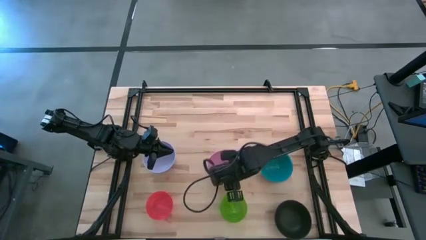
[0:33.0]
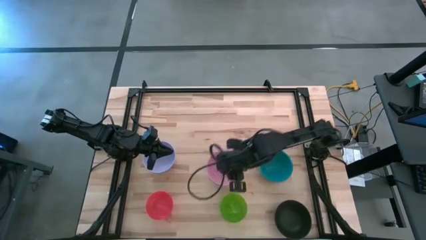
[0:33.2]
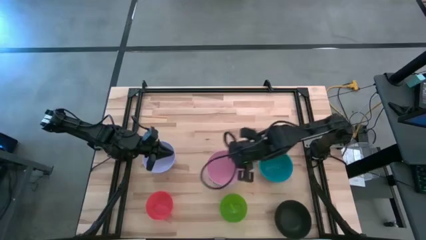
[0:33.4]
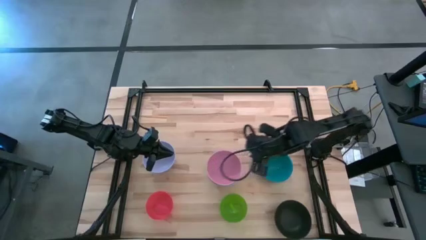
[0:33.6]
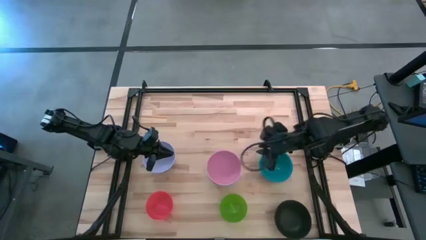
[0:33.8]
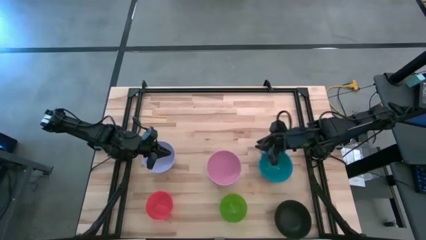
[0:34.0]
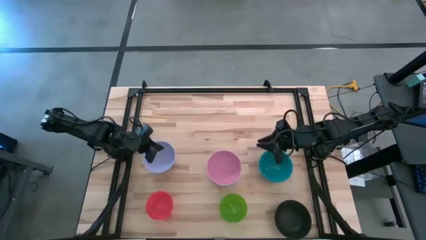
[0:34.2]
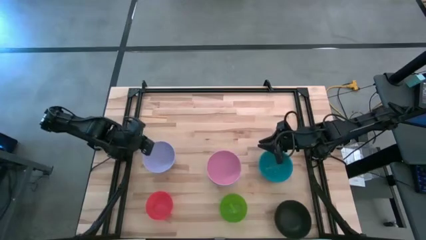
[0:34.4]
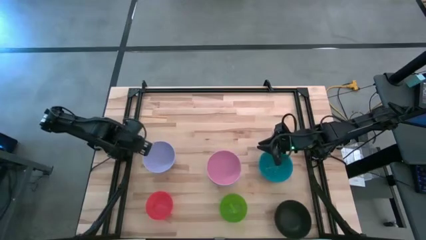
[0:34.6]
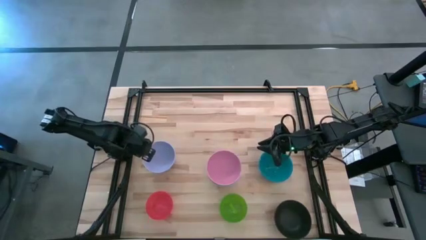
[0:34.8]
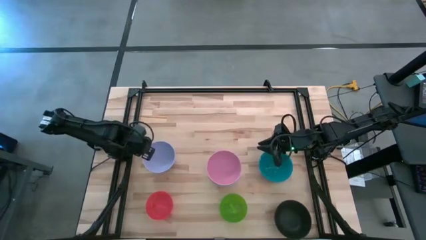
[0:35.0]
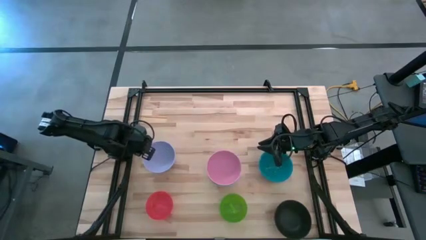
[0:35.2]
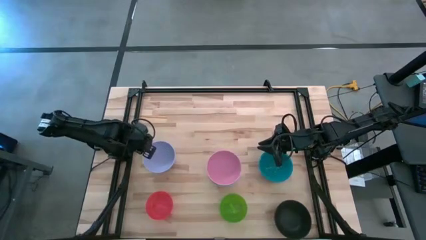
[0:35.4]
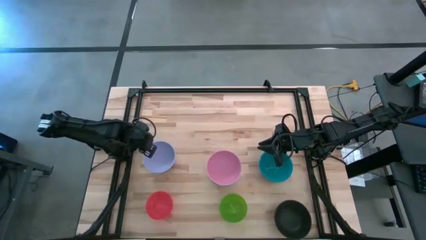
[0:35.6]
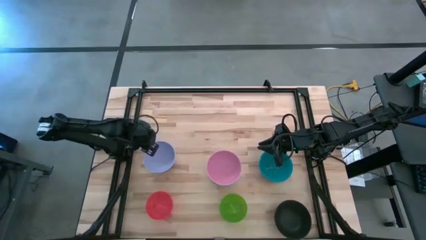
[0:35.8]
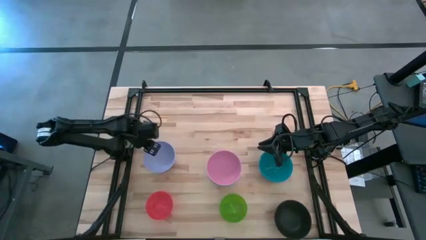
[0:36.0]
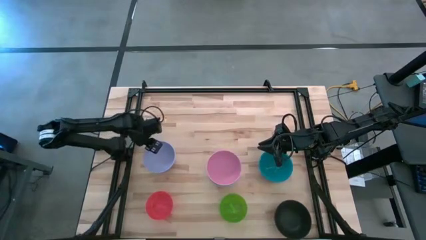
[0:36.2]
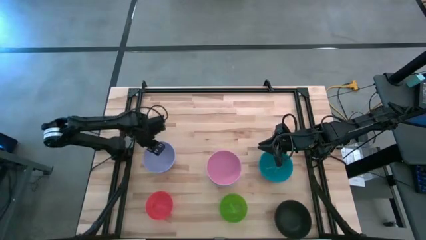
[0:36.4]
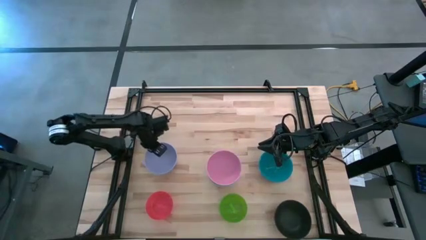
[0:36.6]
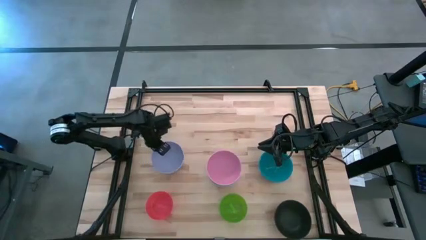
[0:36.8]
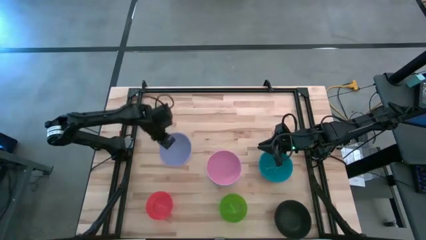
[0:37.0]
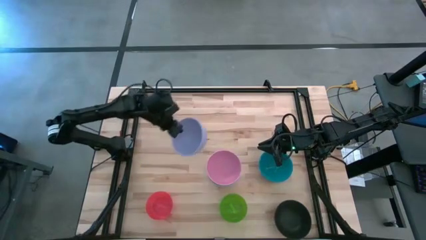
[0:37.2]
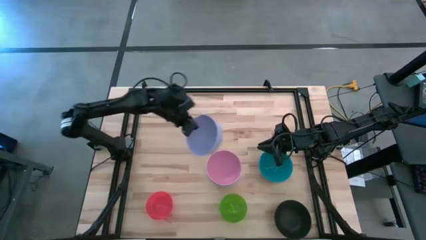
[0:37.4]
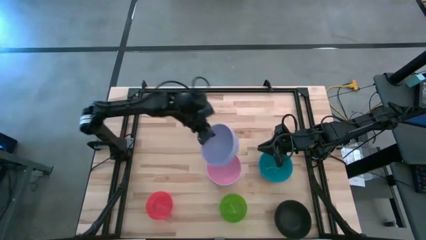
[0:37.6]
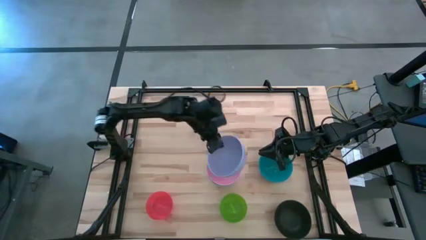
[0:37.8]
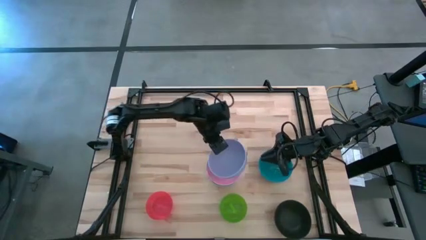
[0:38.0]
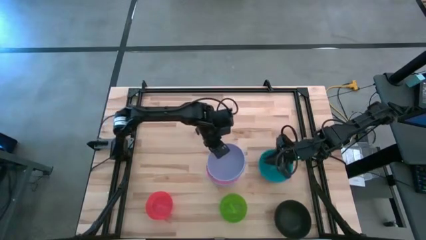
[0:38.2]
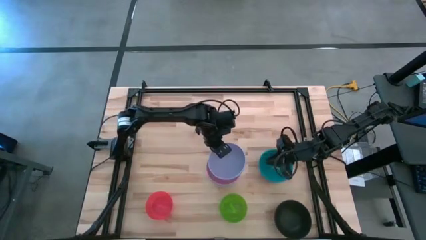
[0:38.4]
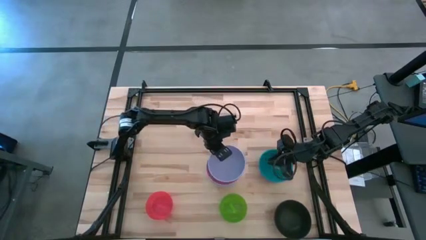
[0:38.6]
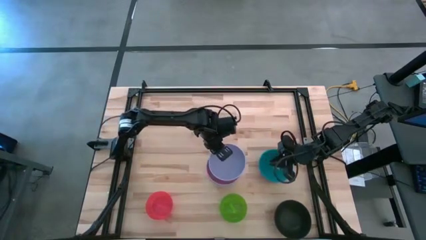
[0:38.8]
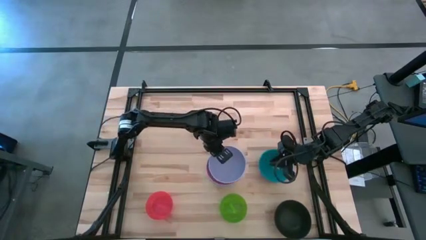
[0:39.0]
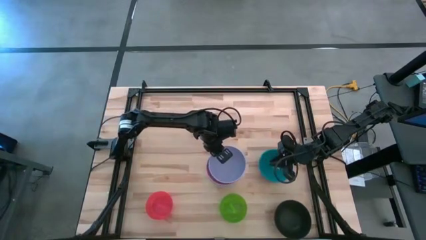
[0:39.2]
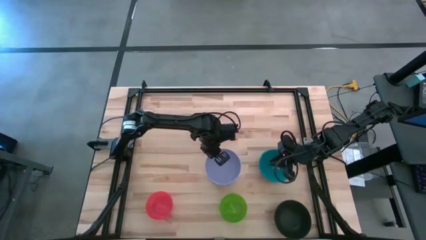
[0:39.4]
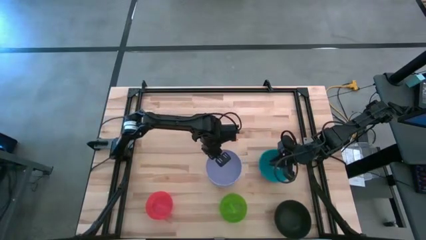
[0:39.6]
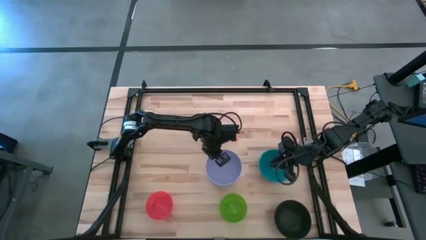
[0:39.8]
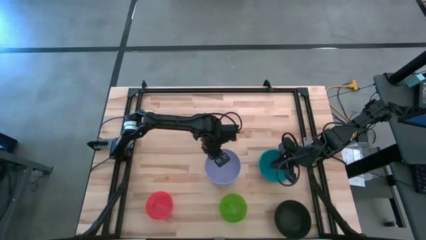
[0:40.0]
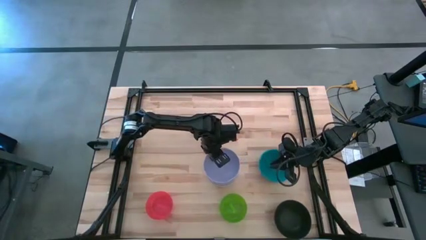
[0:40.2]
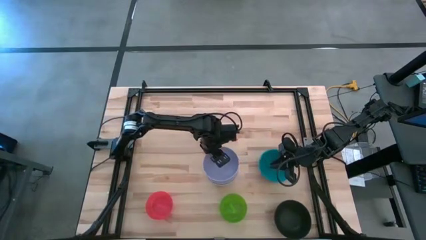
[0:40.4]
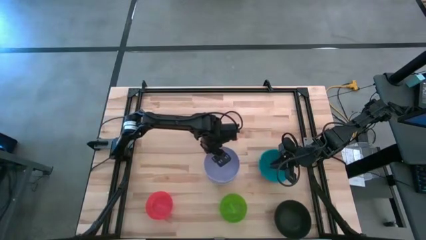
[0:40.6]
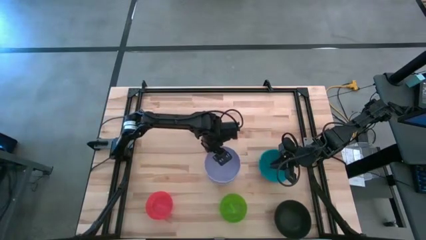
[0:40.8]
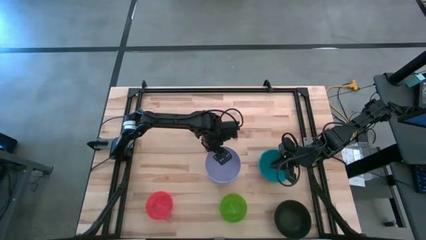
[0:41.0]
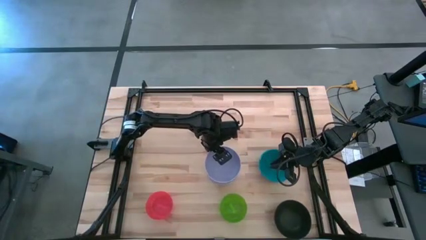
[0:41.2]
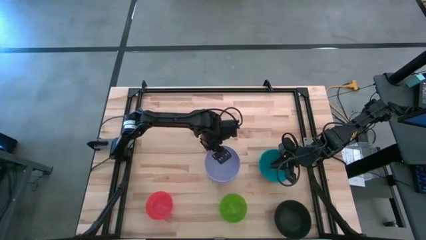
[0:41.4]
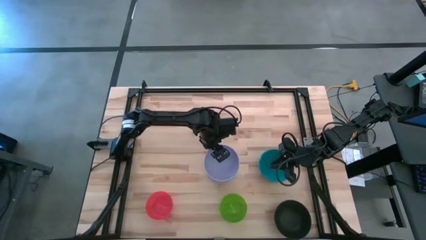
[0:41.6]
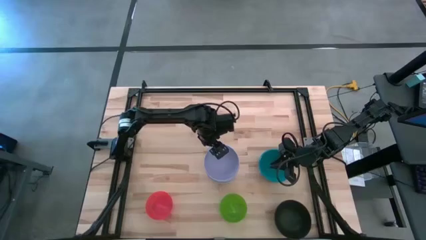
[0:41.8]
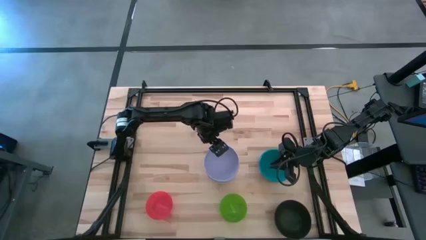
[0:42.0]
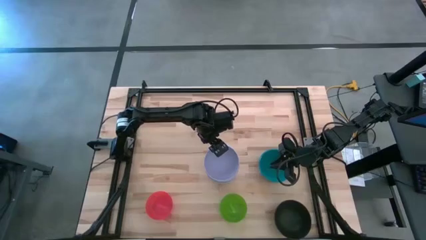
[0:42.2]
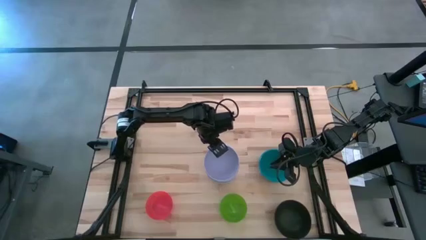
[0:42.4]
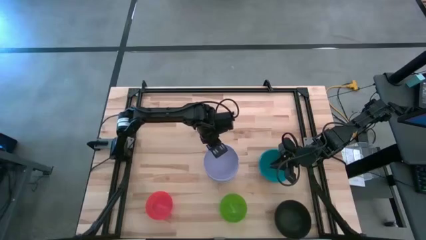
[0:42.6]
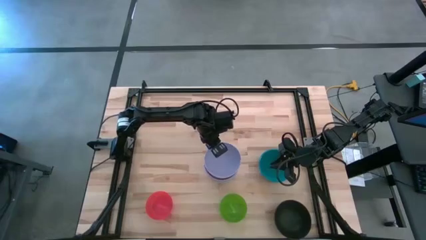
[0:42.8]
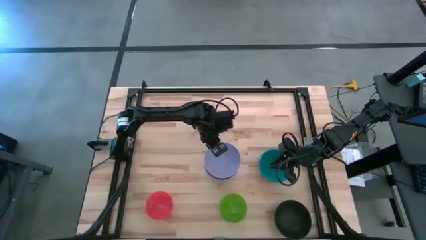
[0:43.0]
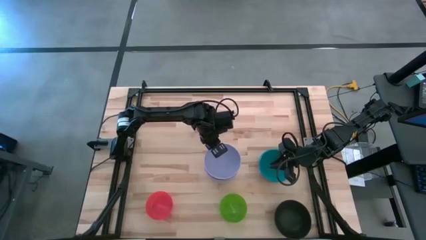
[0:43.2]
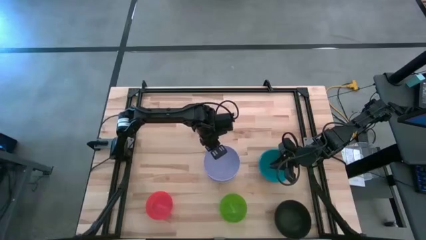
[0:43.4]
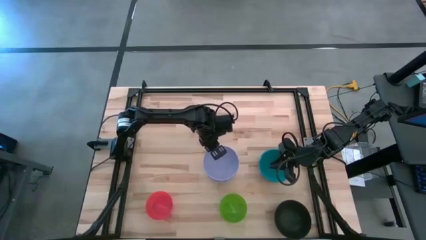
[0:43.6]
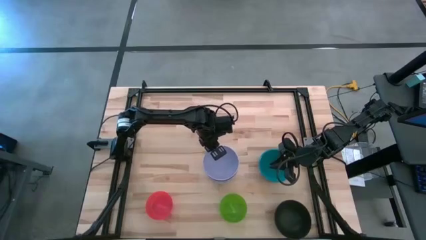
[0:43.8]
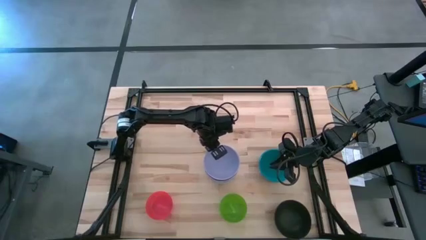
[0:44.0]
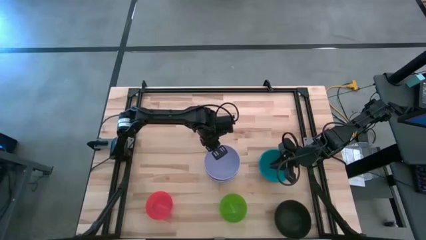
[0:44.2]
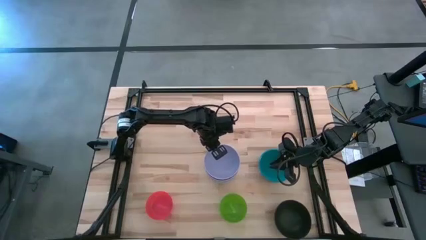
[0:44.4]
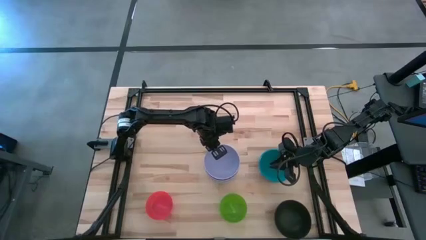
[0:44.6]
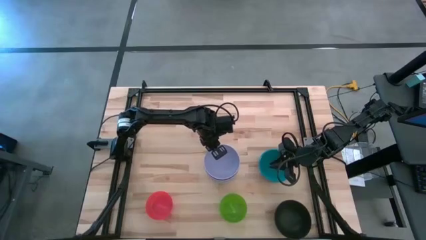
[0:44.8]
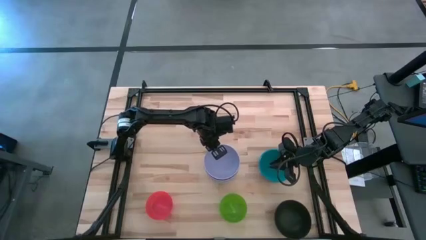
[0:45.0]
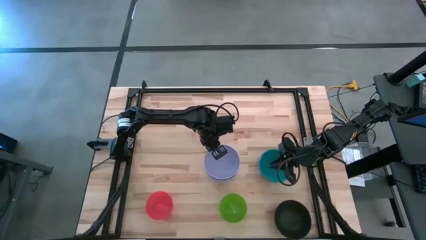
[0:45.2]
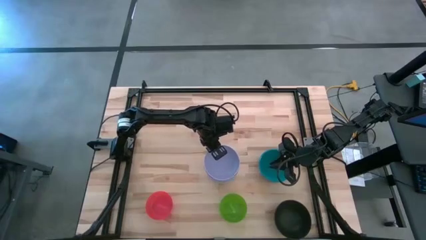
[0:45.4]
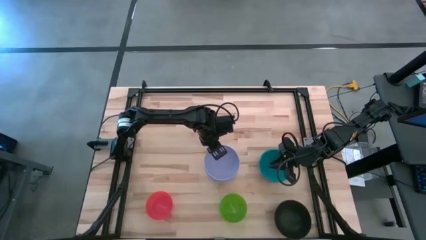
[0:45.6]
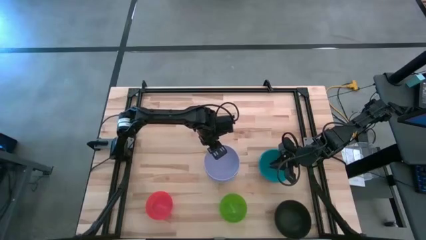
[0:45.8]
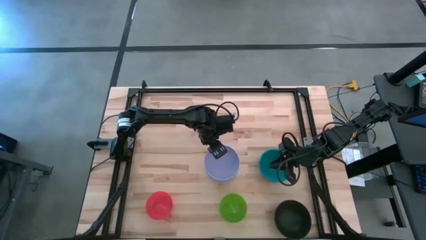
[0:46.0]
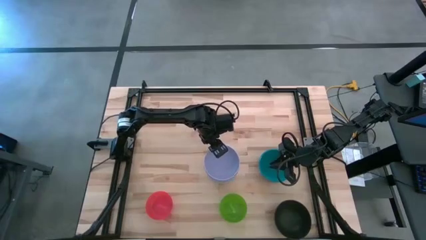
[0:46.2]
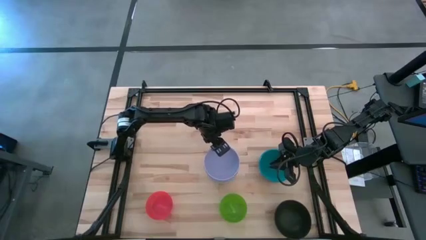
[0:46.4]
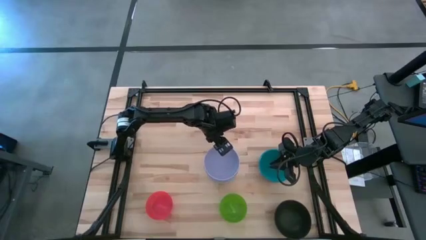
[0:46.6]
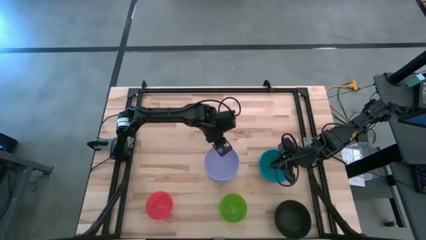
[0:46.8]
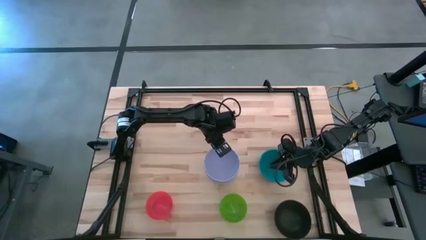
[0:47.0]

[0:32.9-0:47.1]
Task: Nest bowls inside each other
Stack the purple bowl on top of the pink bowl
